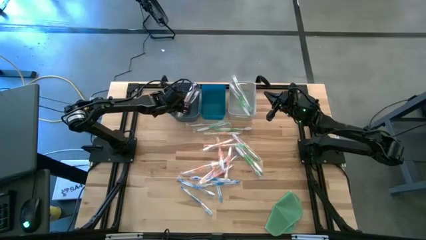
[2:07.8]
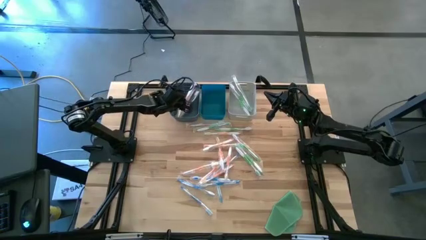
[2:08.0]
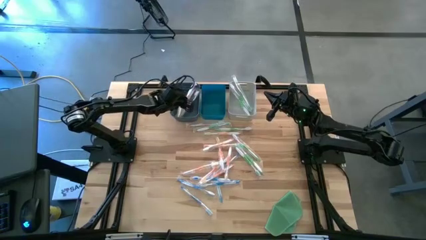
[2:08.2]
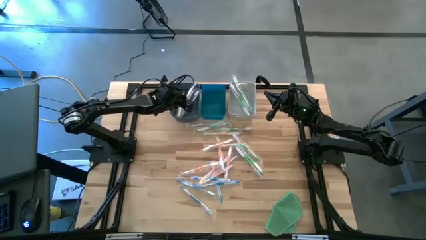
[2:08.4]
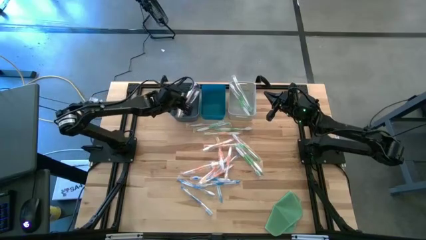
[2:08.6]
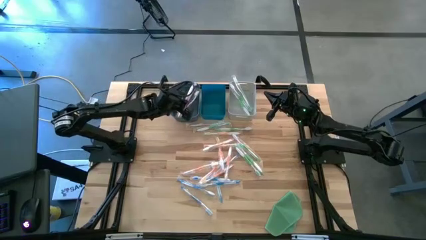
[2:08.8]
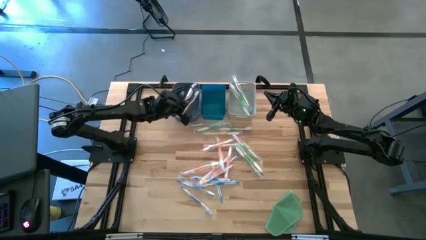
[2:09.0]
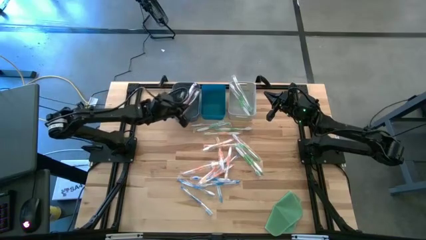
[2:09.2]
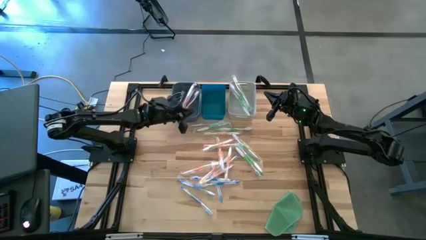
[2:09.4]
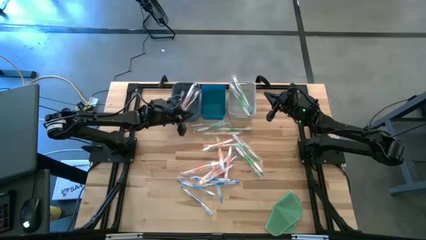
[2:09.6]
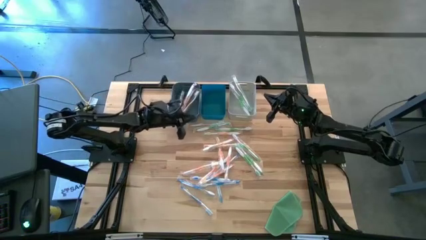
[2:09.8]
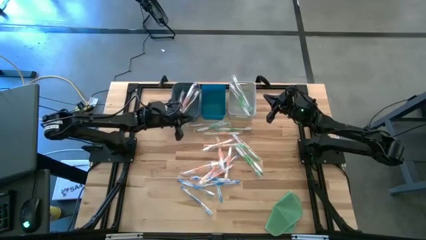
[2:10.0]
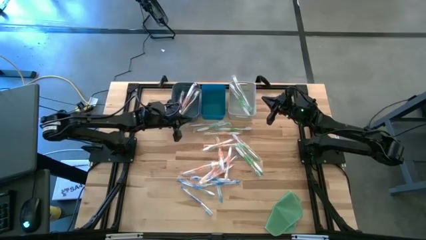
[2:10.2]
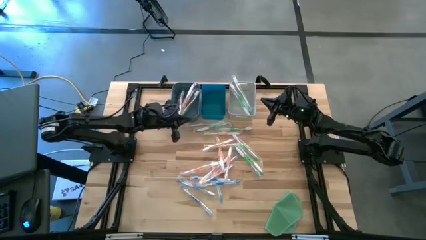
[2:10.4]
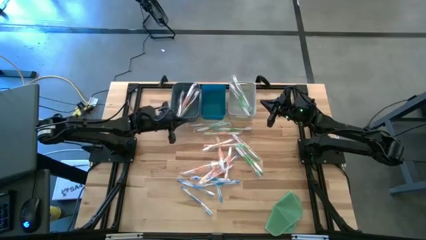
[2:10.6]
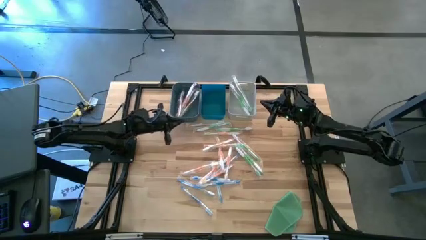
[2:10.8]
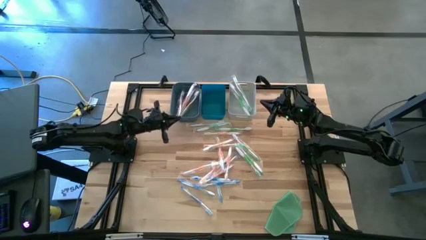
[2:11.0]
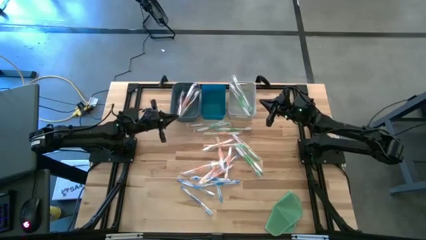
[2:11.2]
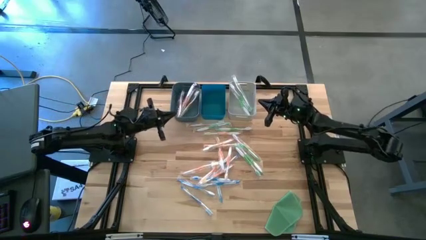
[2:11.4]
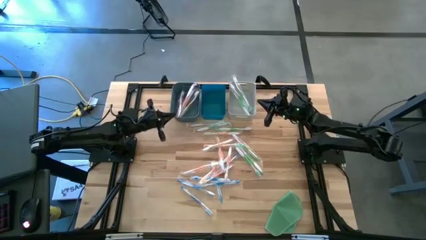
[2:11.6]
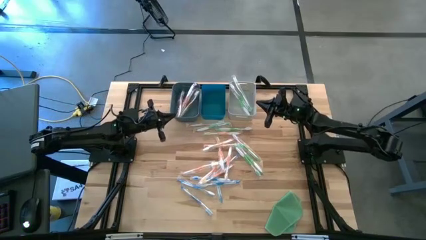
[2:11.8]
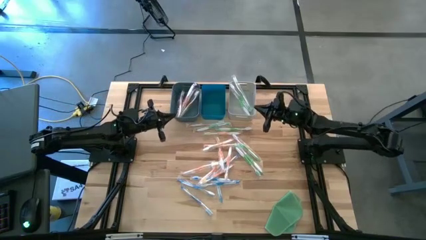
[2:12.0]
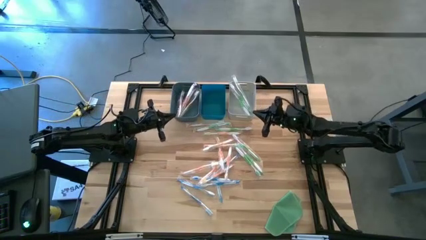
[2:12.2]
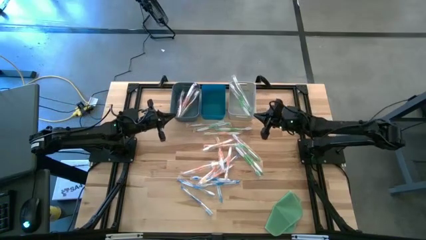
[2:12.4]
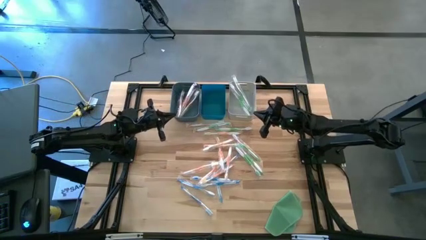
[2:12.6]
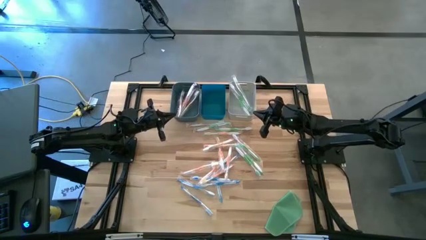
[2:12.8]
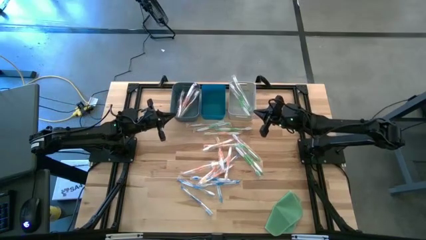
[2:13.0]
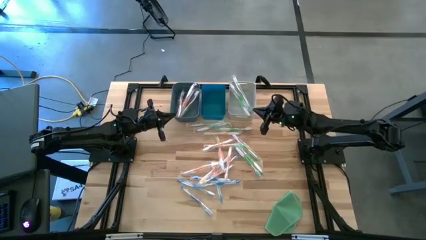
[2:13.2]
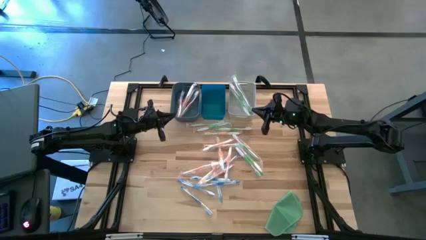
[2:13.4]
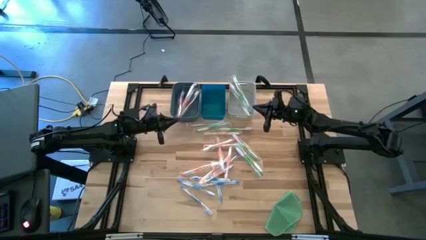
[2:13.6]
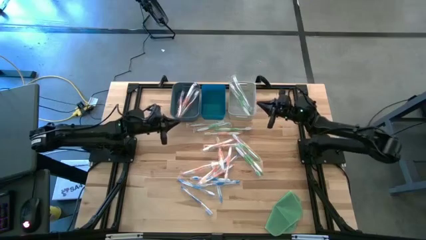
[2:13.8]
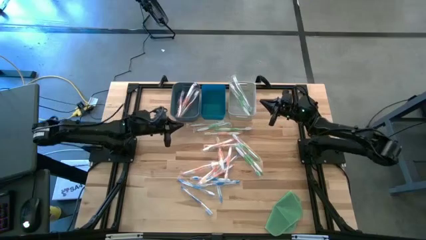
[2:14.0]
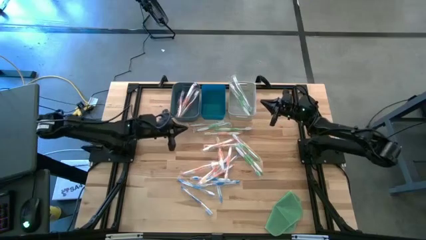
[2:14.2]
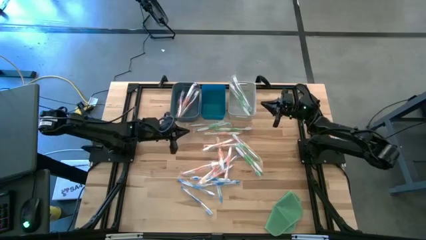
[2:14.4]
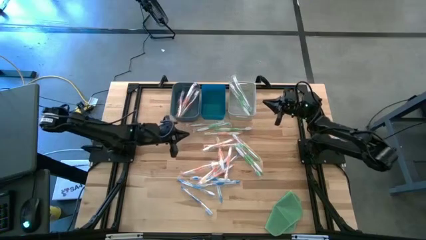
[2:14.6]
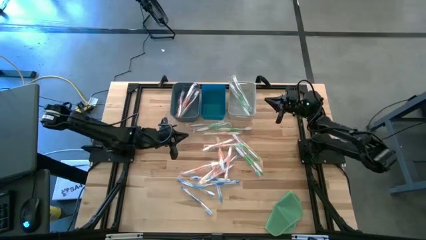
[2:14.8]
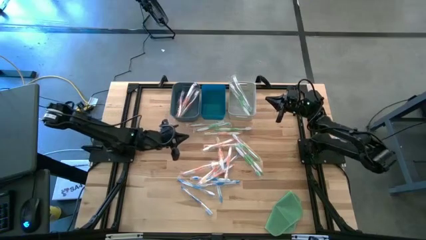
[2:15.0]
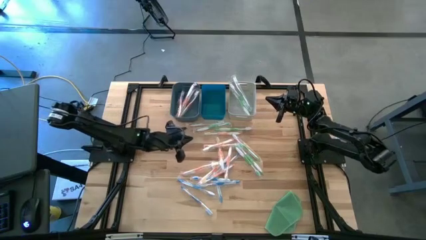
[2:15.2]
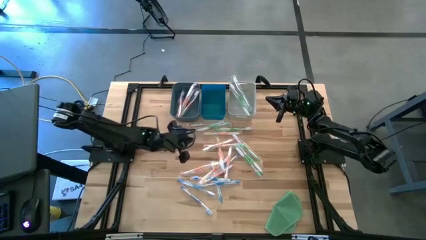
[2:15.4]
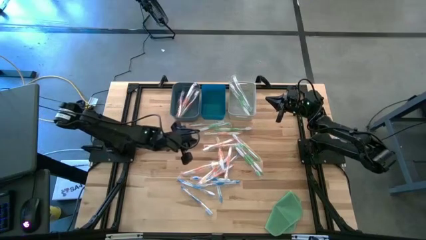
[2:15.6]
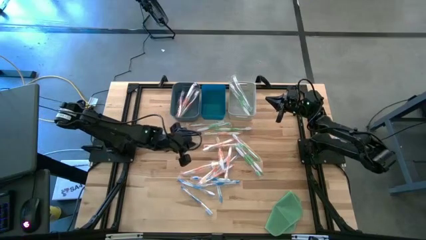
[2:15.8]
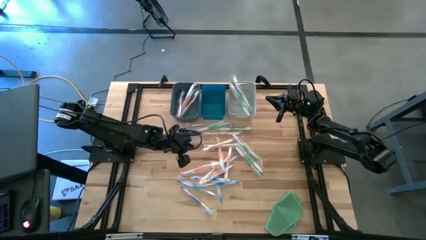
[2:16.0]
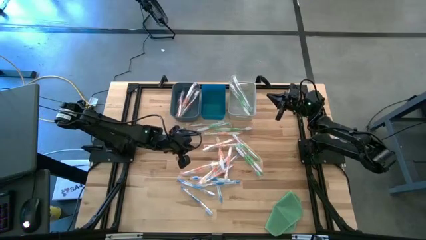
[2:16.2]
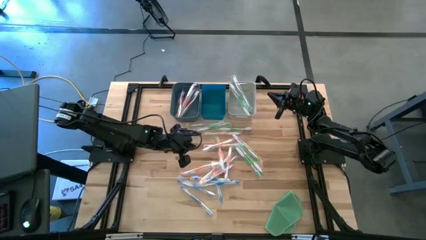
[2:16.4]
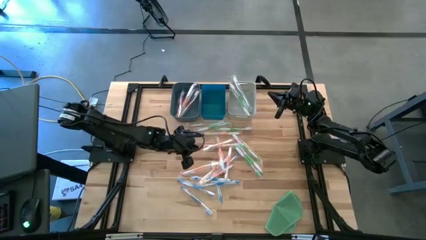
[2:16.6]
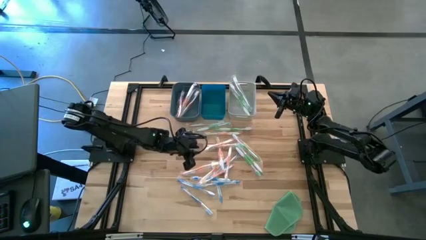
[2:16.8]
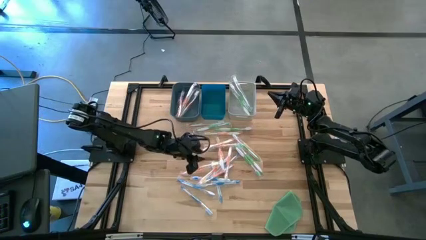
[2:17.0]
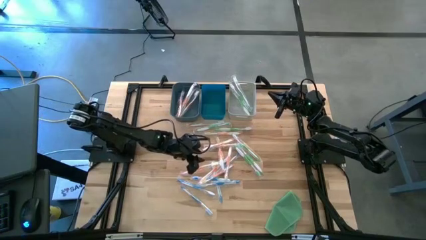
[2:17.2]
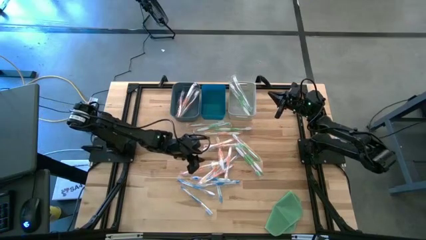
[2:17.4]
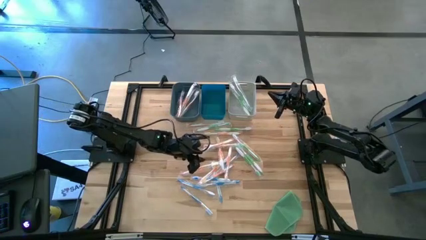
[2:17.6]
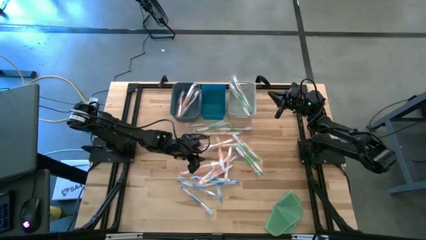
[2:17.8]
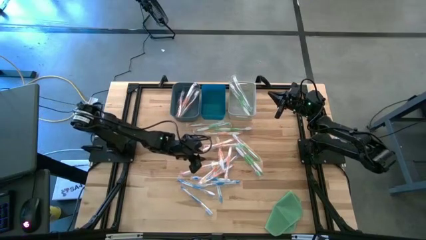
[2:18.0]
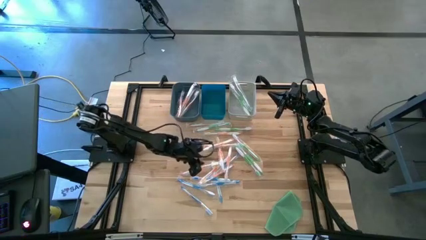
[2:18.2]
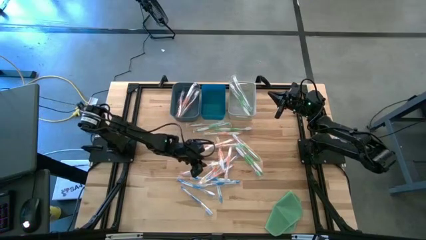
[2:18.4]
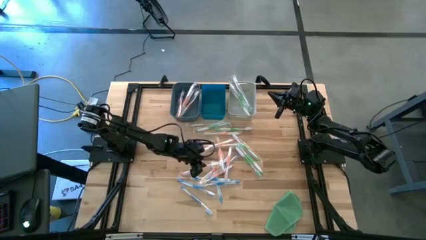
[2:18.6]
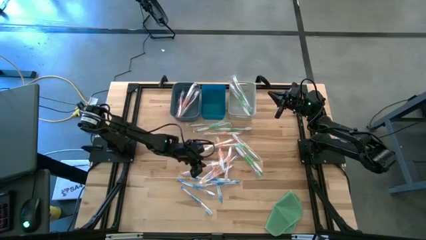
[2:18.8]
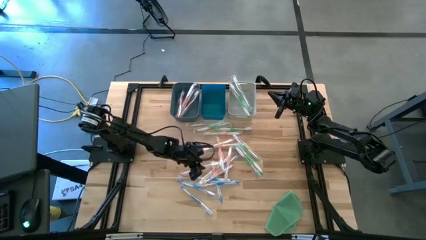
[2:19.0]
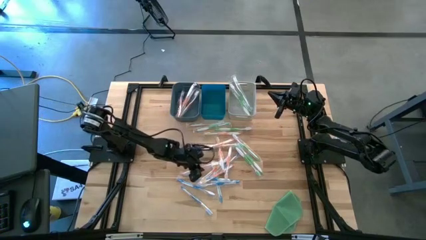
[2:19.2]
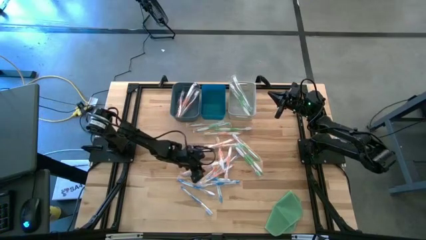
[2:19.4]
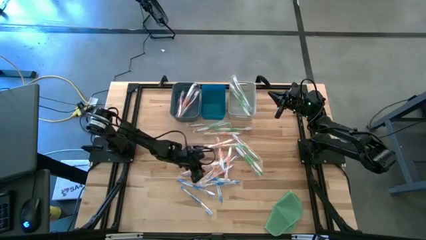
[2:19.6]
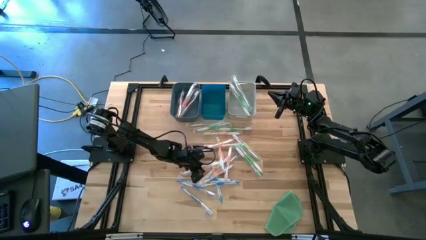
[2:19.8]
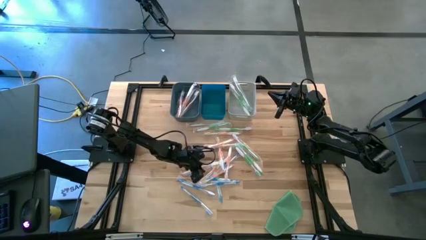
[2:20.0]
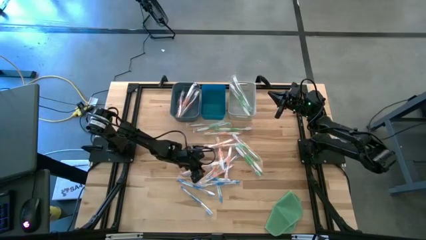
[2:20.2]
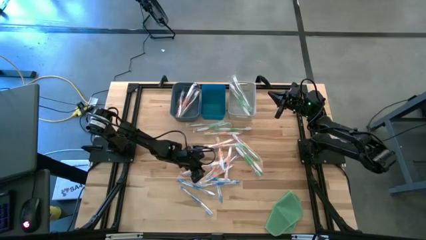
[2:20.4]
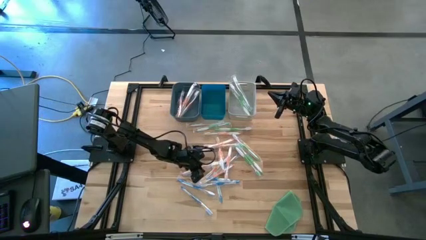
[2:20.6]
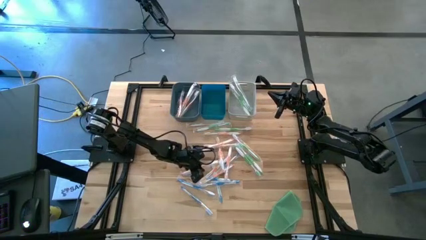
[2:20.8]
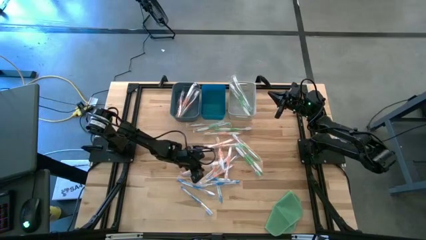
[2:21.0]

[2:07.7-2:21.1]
Task: Pick & Place Toothbrushes
Put the orange toothbrush into the dark blue bin

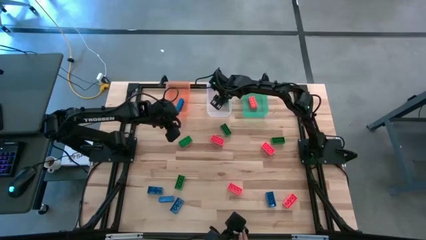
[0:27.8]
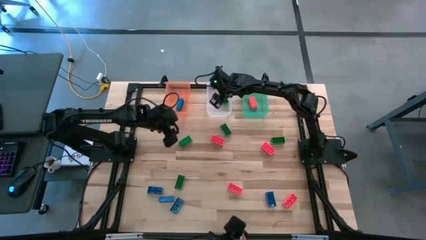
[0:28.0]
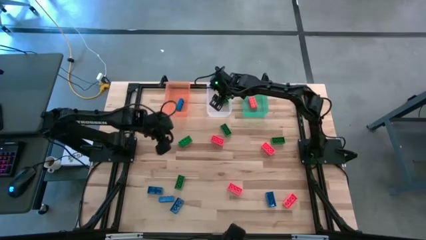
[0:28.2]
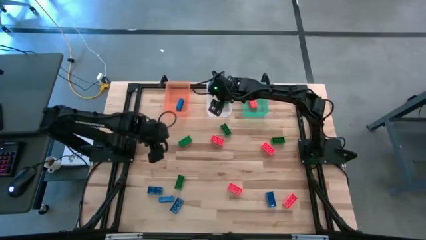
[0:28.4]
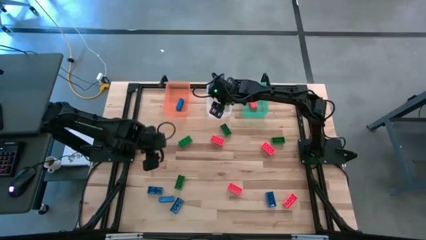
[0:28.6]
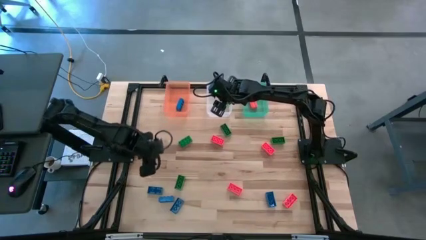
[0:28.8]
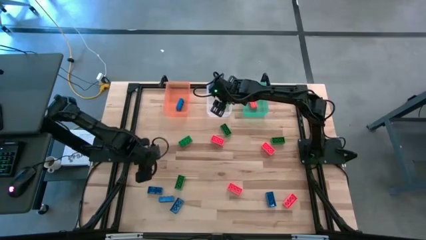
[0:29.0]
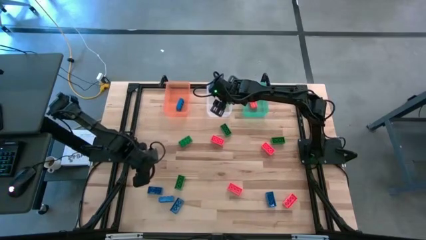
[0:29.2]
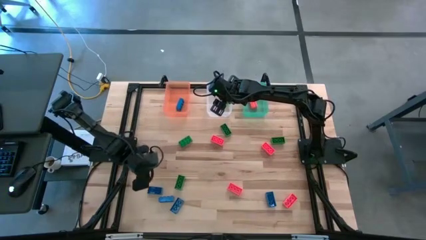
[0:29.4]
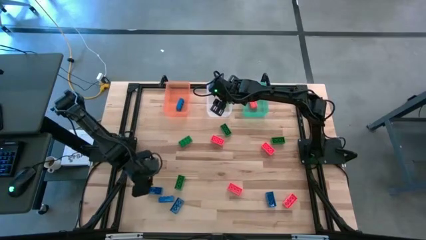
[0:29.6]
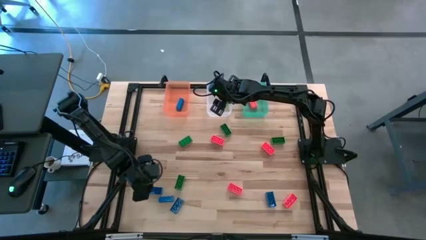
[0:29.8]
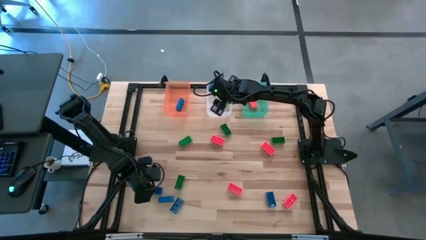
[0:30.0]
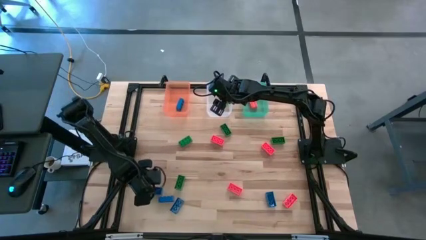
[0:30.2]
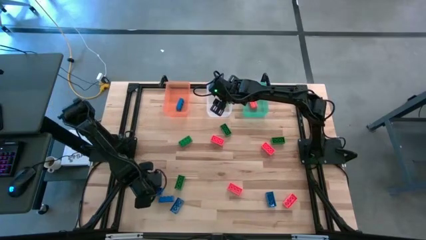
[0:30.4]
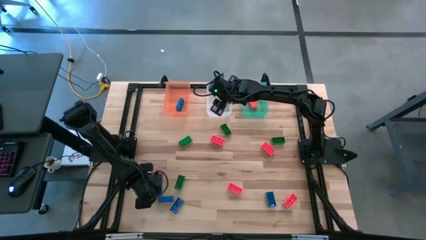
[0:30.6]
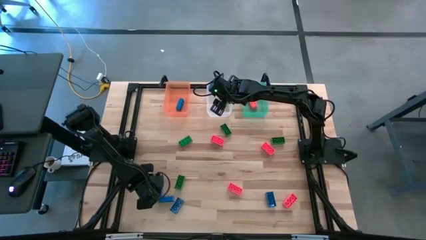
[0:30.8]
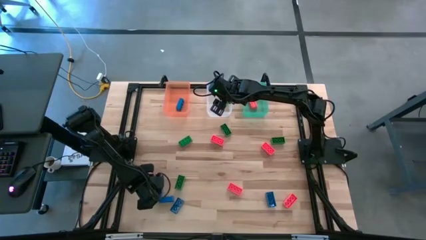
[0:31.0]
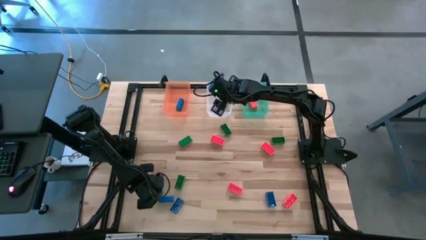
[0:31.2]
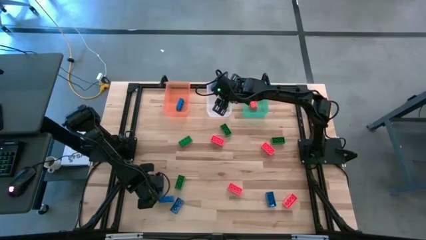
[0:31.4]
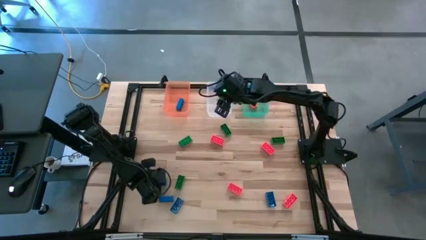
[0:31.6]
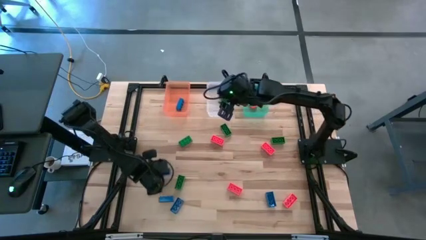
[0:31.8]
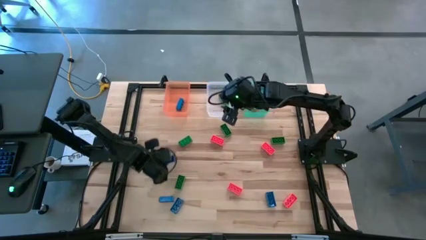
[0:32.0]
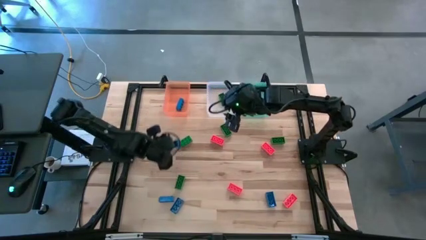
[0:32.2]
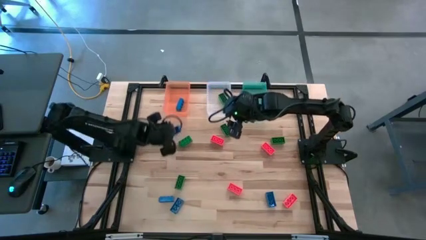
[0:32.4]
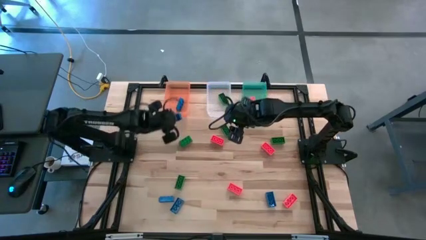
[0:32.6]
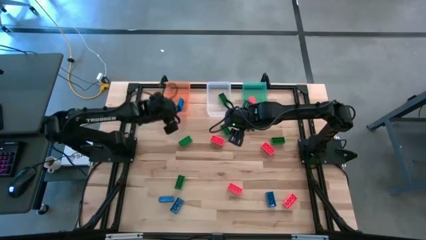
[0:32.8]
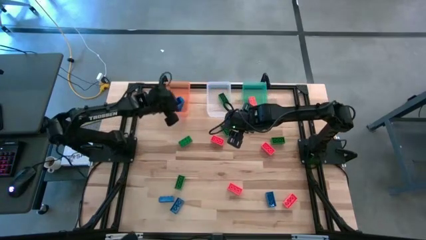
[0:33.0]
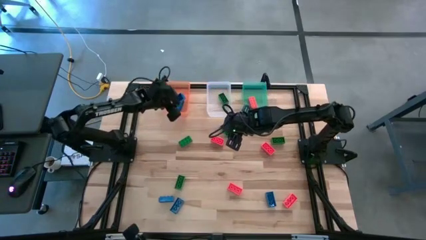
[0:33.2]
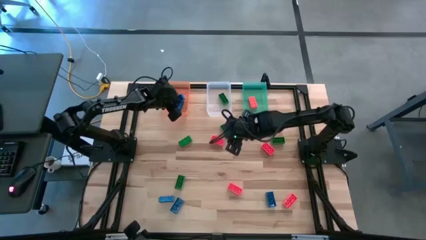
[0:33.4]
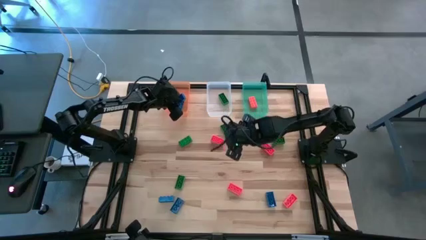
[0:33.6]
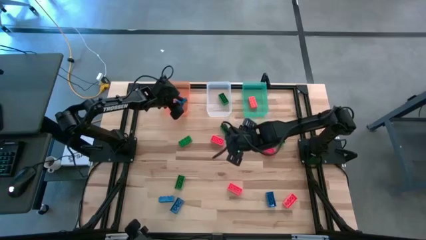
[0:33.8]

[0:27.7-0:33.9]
Task: Sort & place blocks by color
Put the blue game piece into the bin
